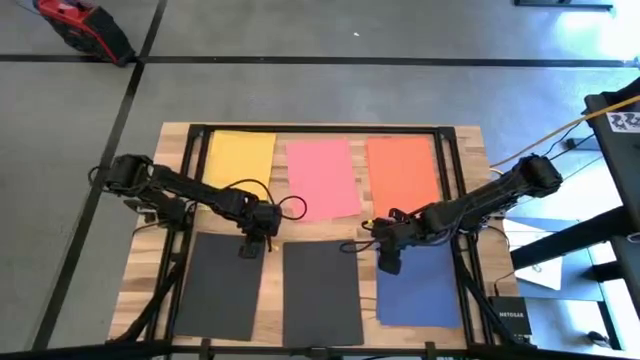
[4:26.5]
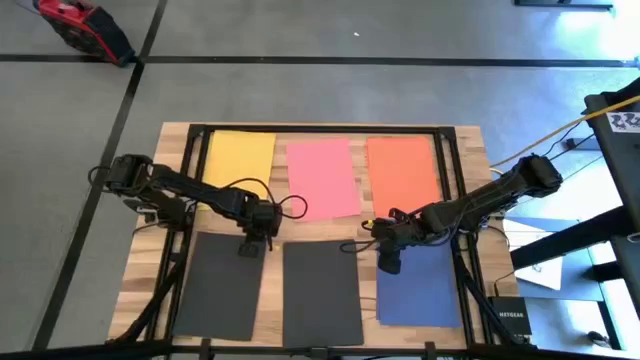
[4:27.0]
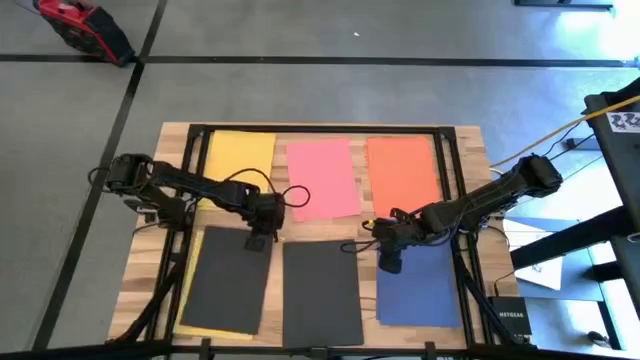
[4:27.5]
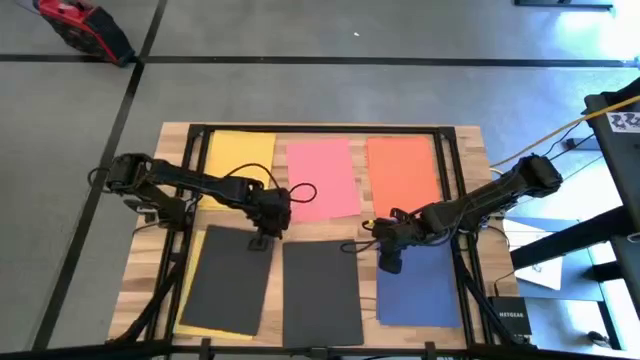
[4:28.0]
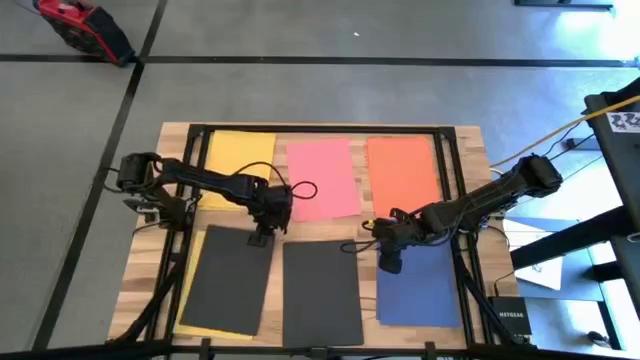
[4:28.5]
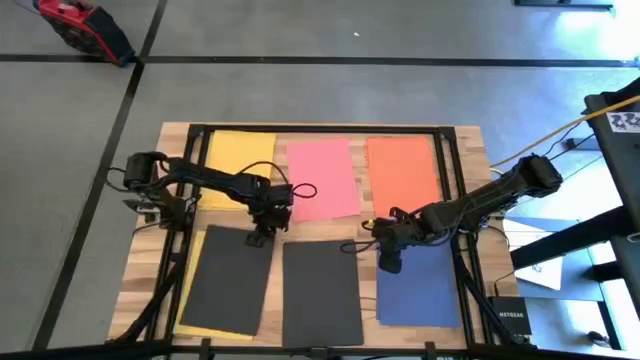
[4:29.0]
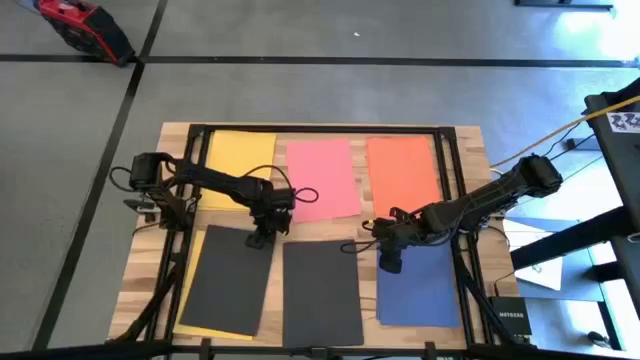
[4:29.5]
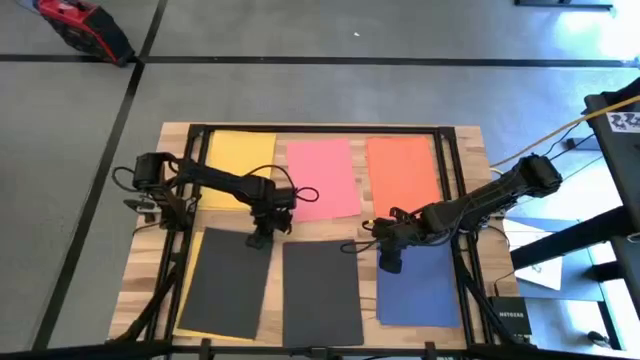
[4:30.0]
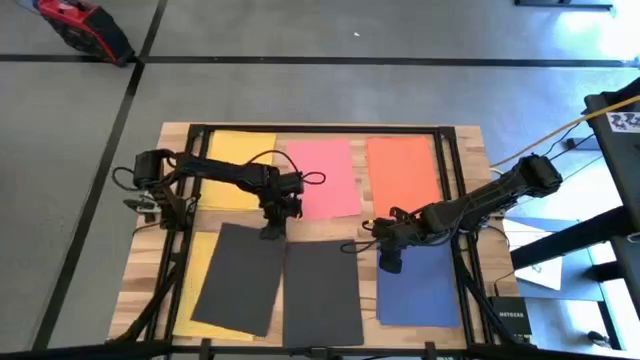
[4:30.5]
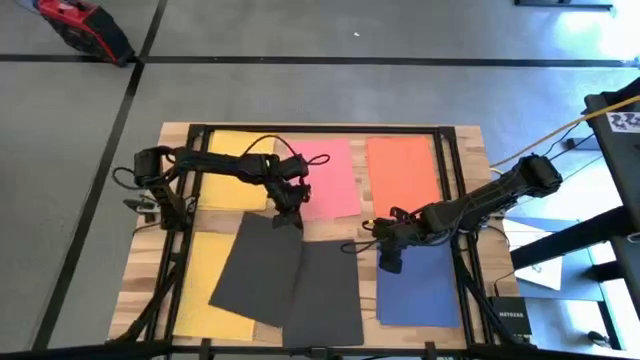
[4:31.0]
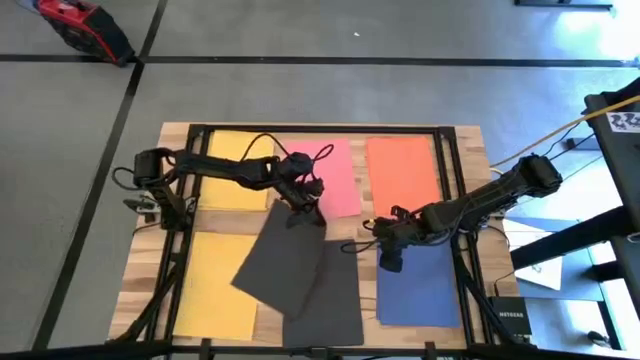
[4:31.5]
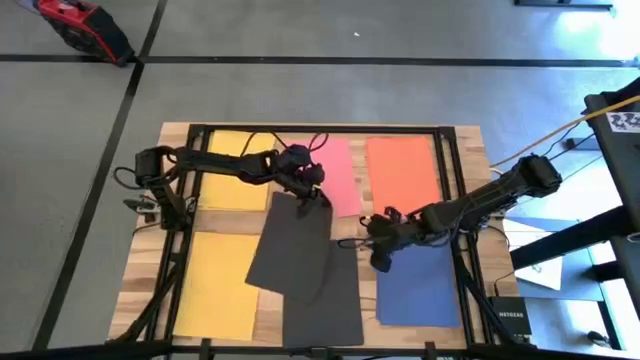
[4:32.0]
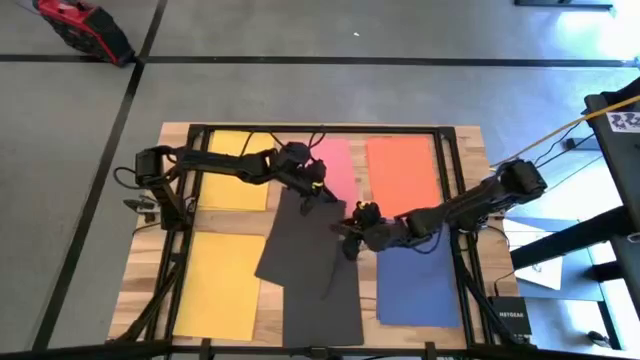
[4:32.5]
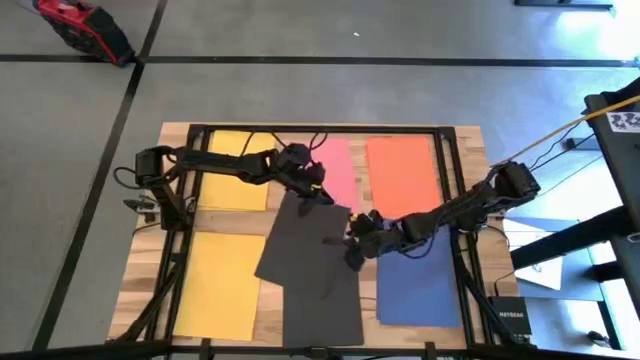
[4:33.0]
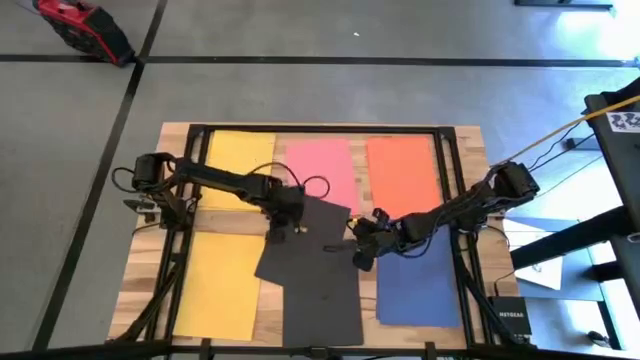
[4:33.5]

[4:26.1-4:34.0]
Task: Organize paper
Stack the black paper on the top of the black paper

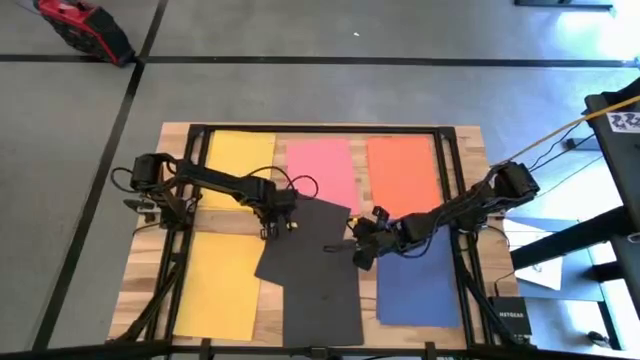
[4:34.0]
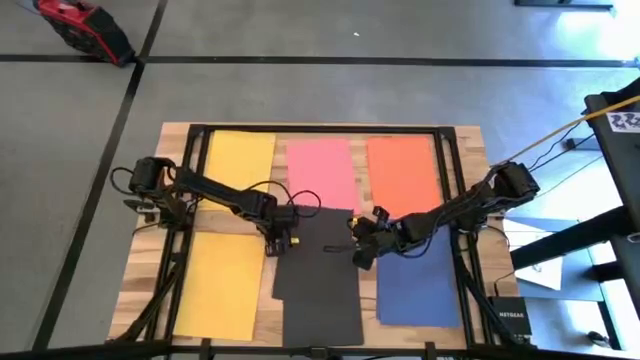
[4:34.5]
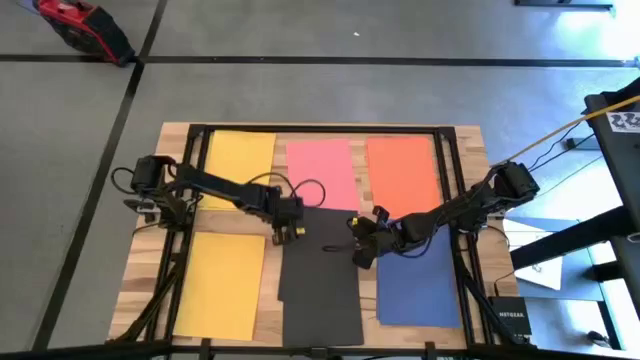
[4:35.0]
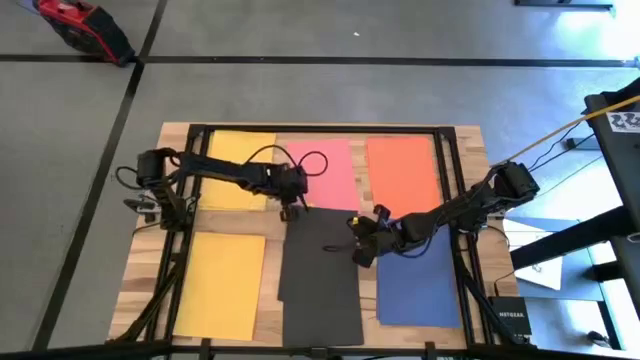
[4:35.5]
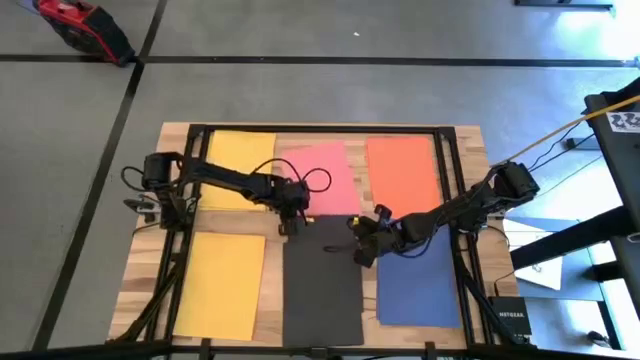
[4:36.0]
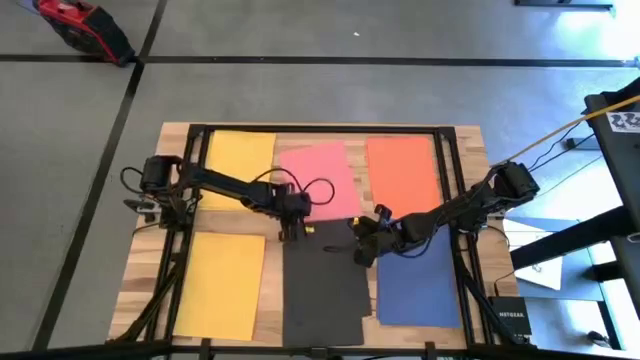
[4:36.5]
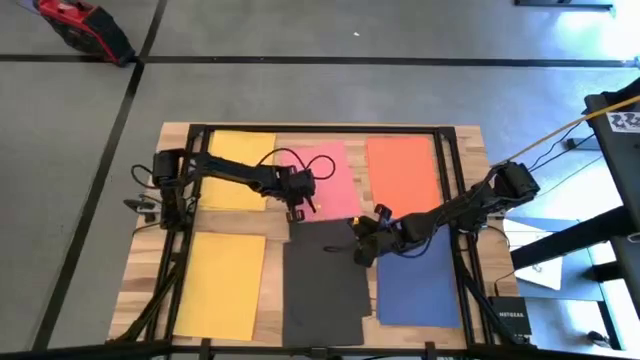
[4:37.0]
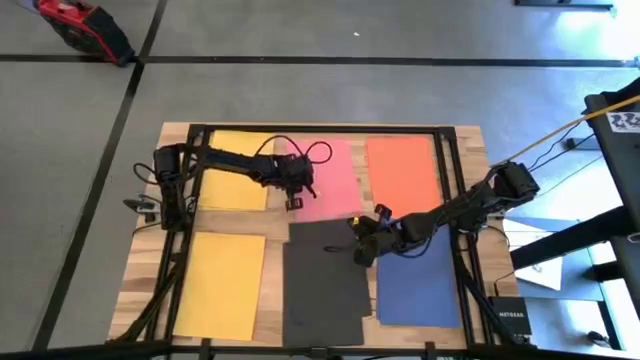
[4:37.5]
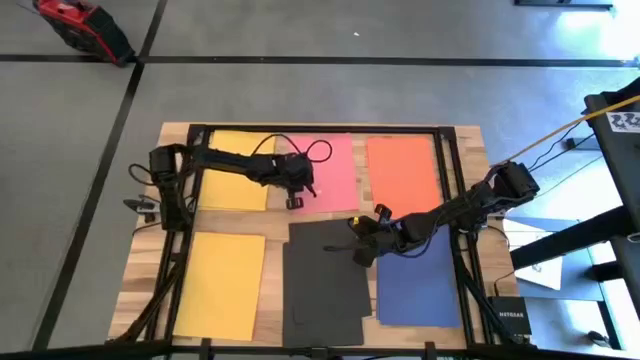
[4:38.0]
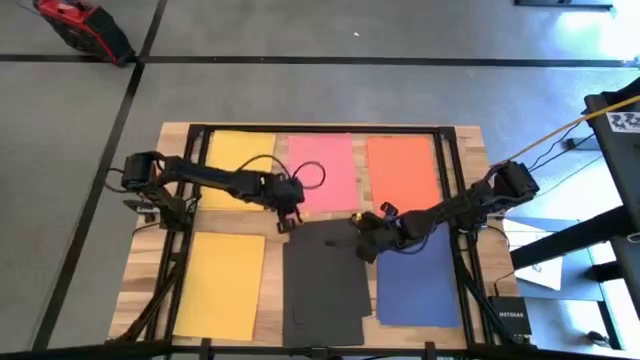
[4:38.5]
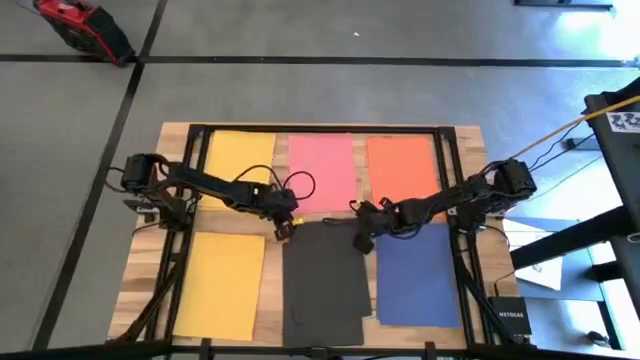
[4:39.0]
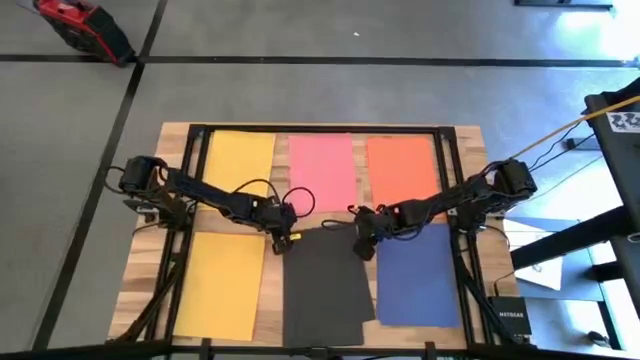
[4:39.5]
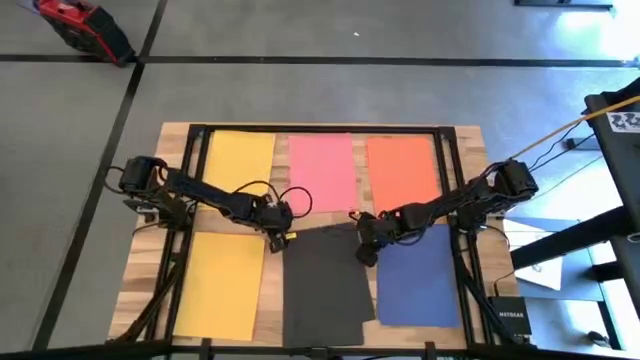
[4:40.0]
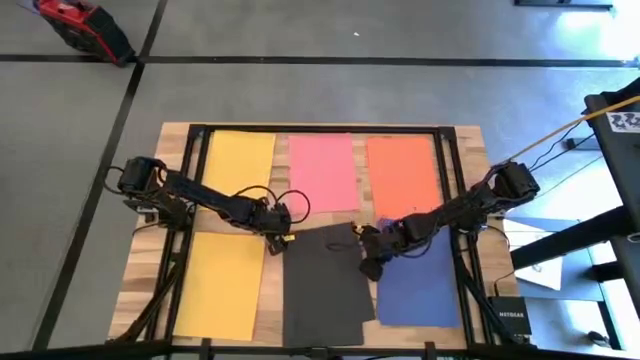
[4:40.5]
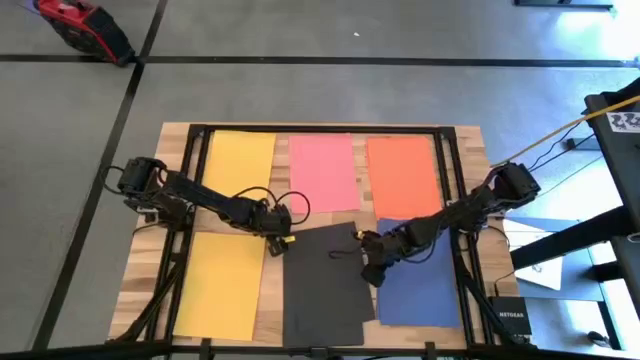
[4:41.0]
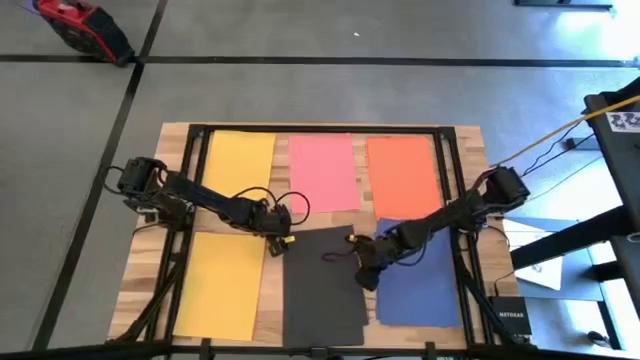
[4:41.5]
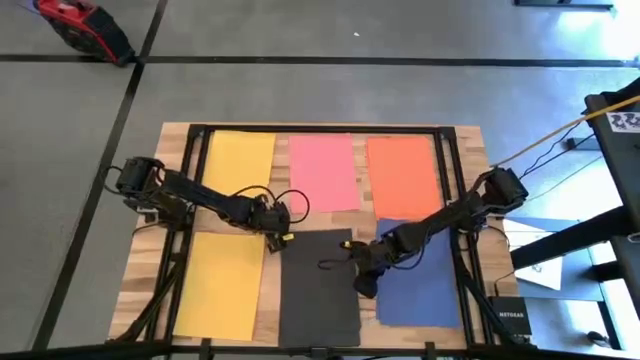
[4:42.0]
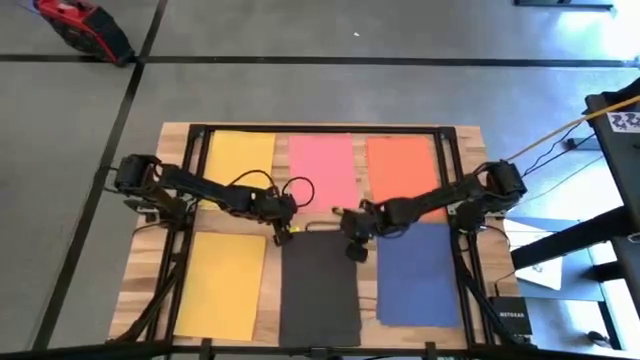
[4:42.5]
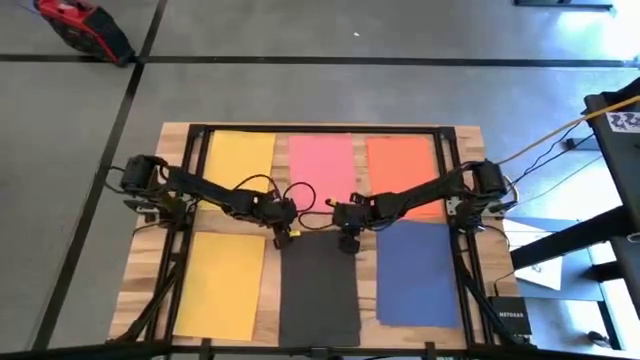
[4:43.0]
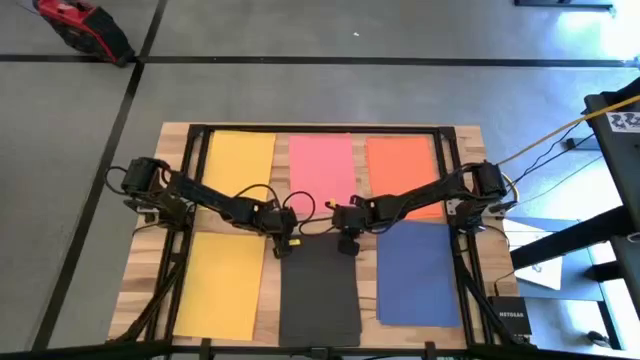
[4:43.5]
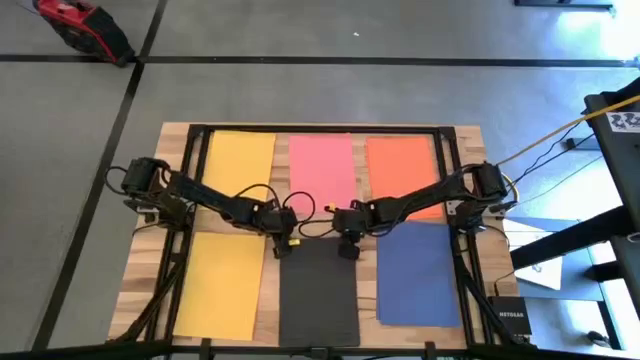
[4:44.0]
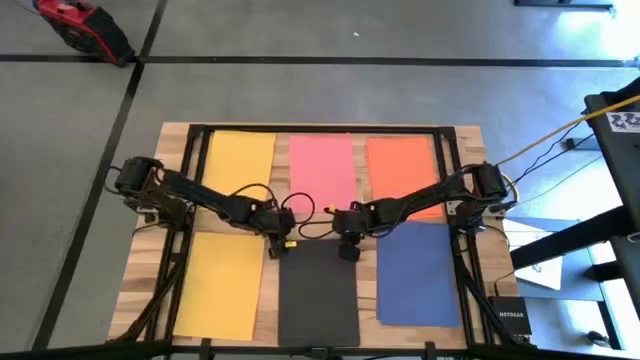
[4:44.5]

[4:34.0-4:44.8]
Stack the black paper on the top of the black paper

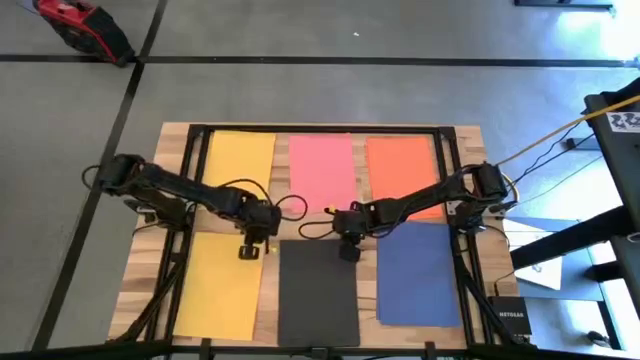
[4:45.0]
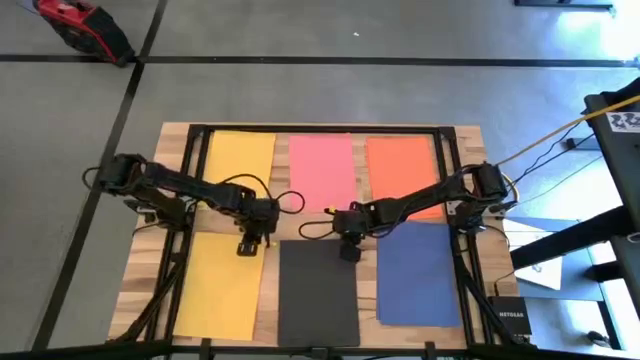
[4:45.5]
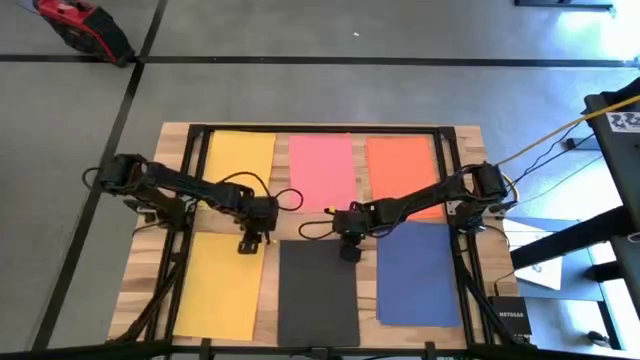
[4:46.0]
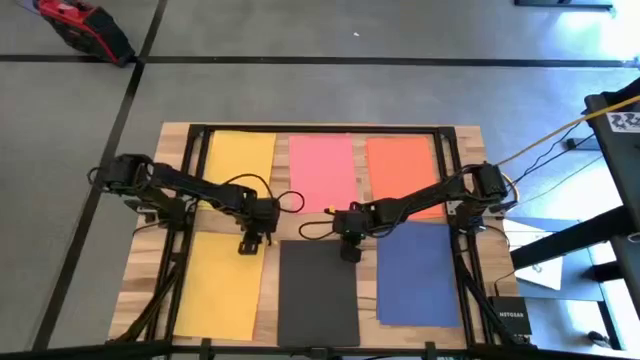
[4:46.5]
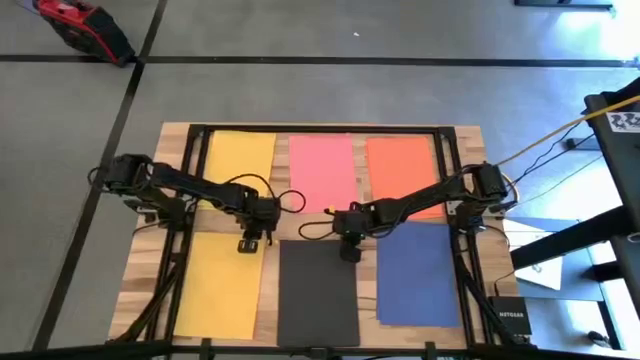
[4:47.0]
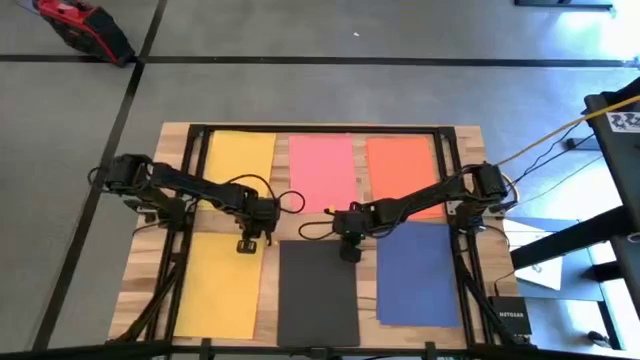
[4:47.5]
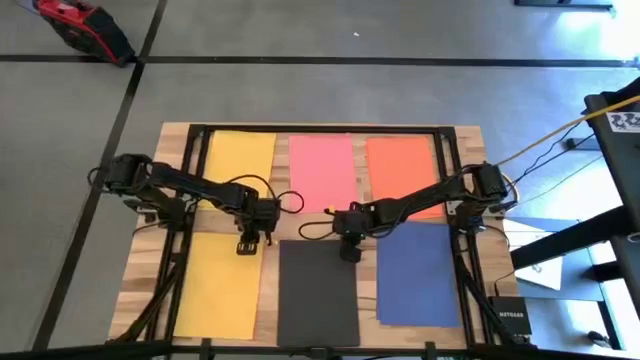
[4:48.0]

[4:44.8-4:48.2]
Stack the yellow paper on the top of the yellow paper
